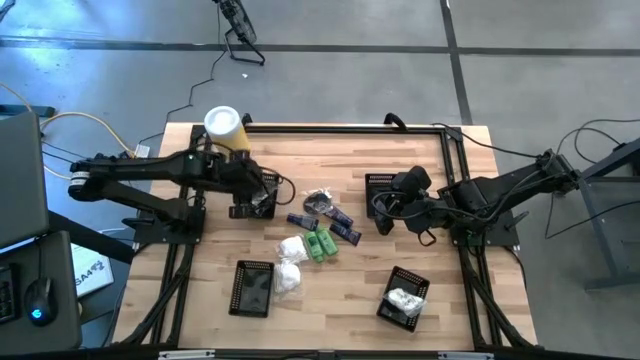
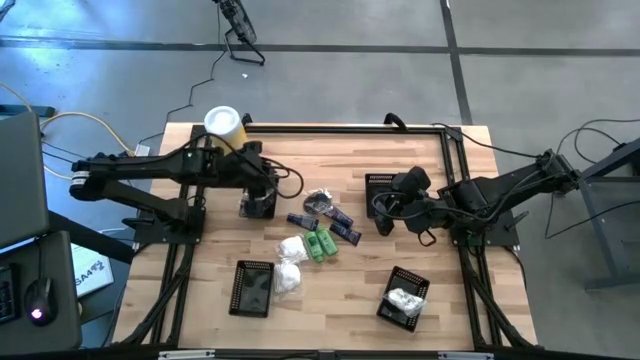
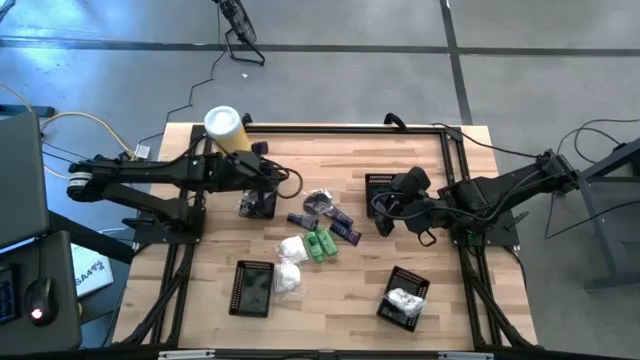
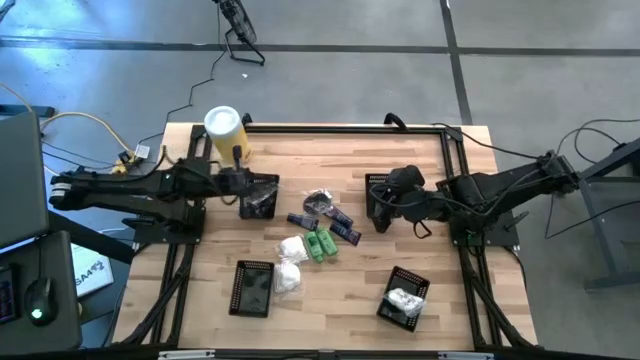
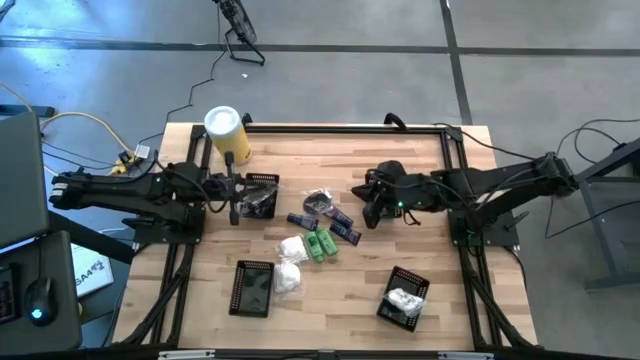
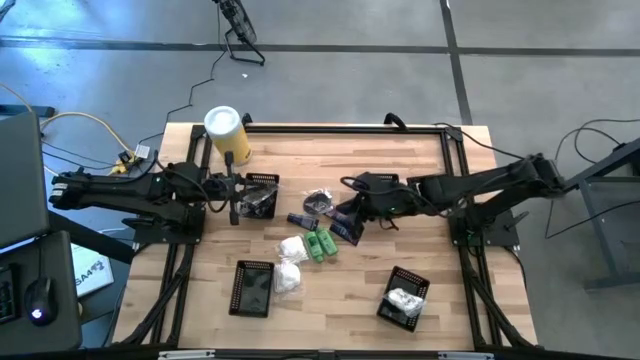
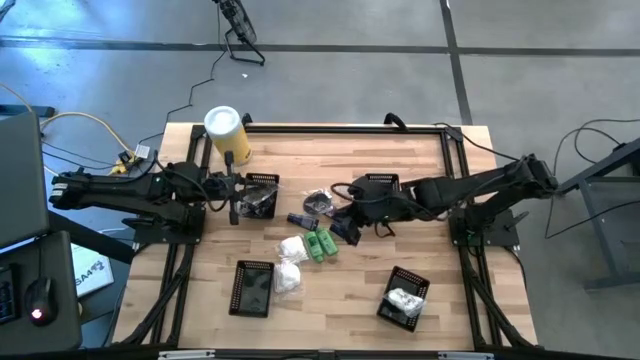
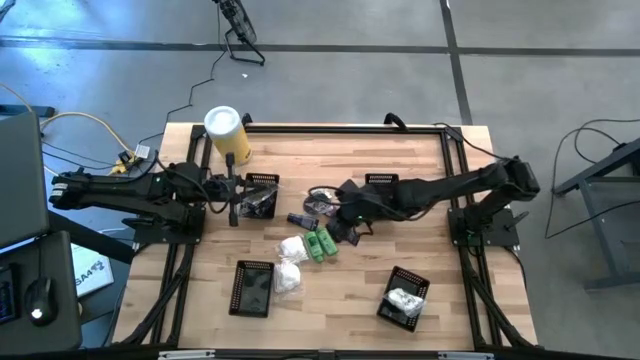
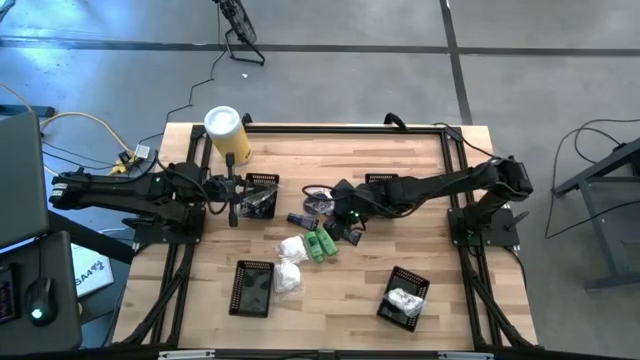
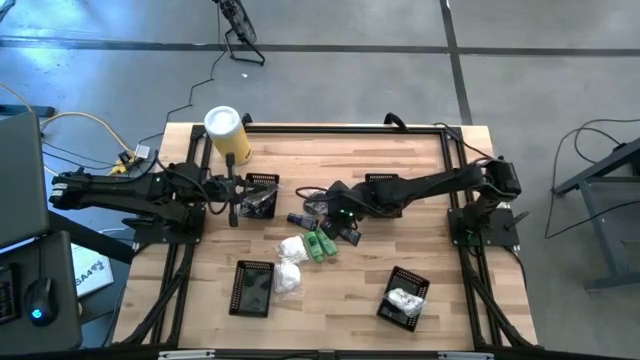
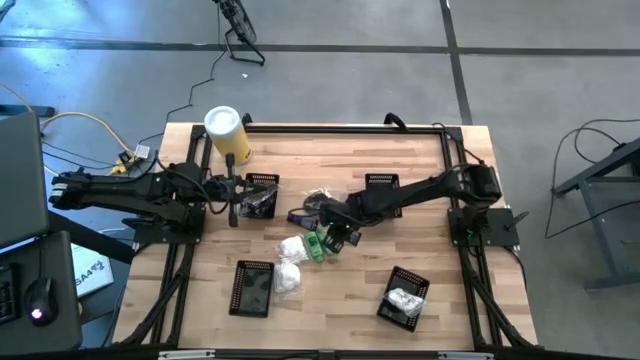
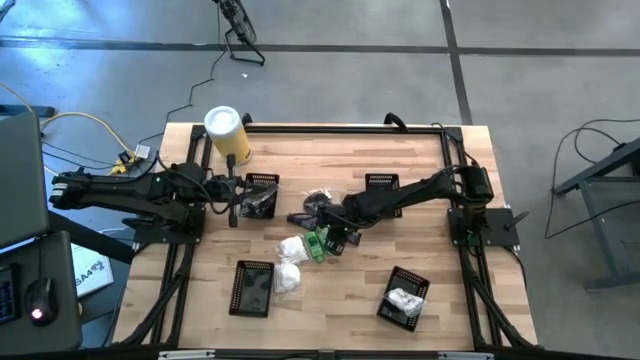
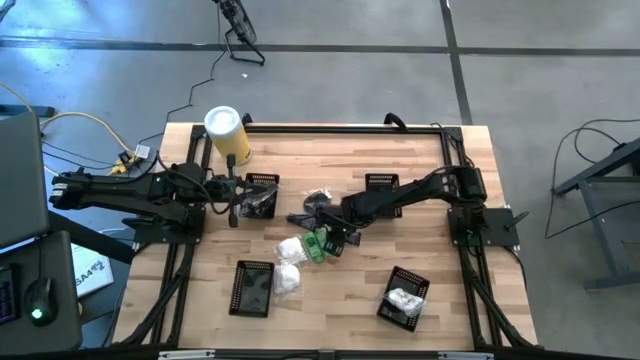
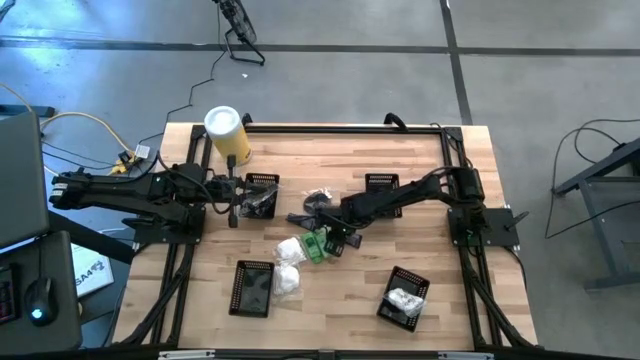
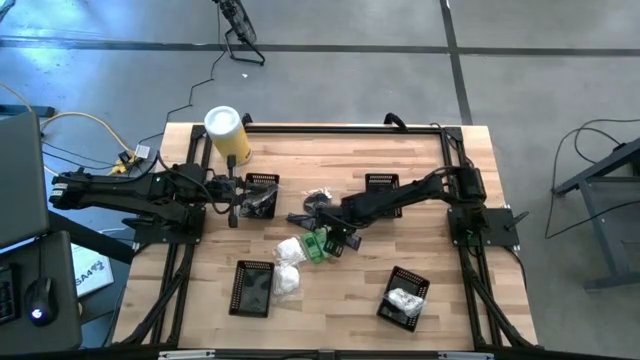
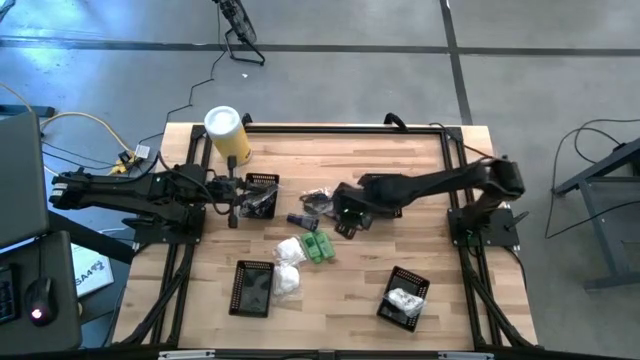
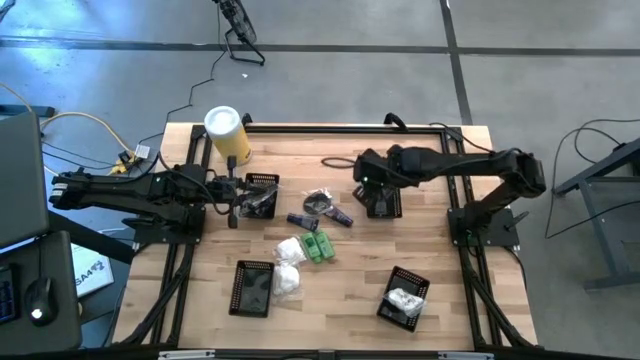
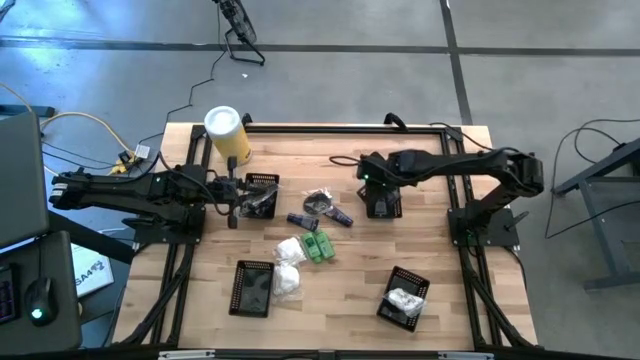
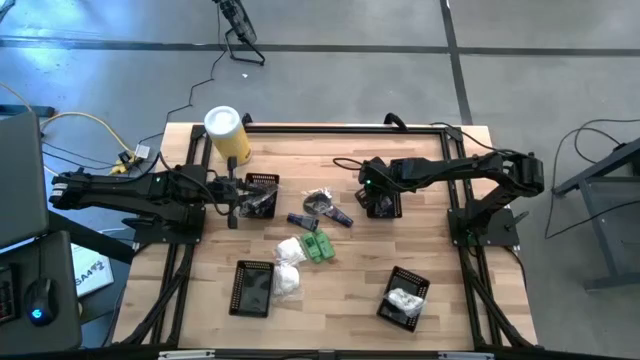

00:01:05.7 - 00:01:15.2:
Task: Pick & Place Travel size toiletries
Put the blue shave cream into the top right black basket

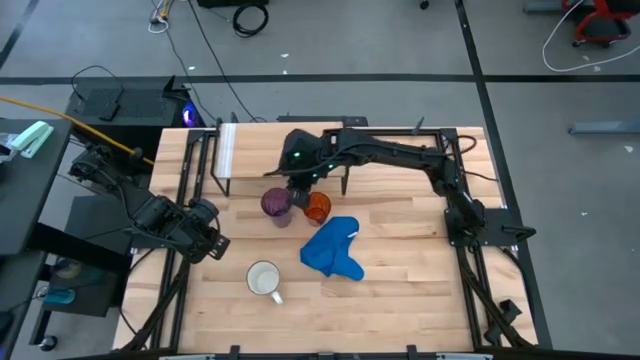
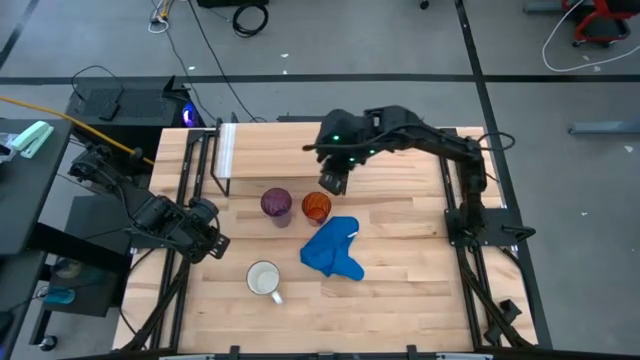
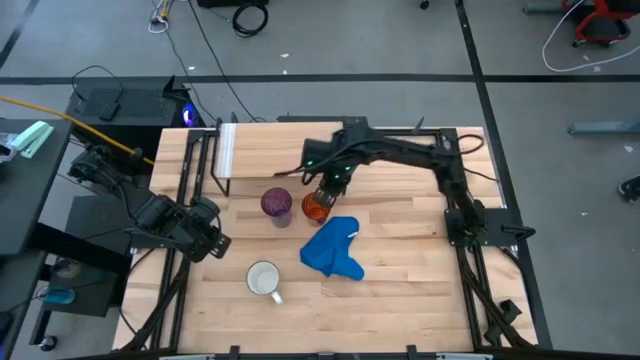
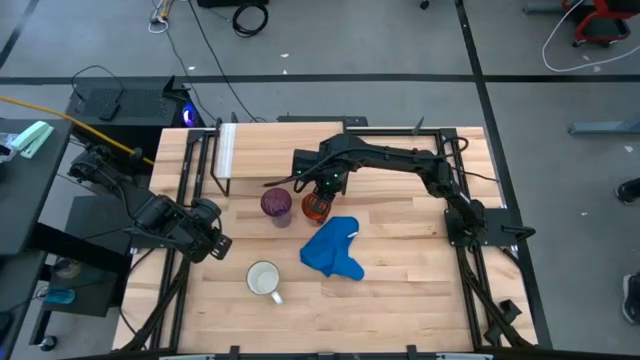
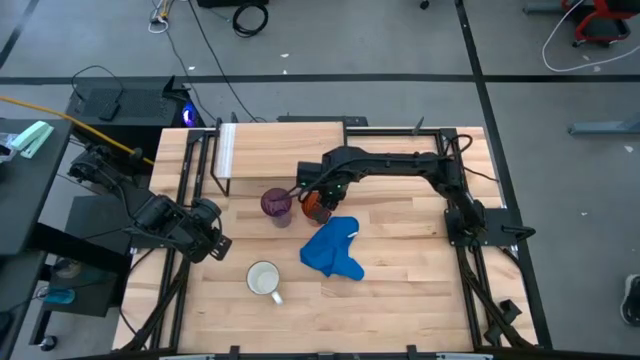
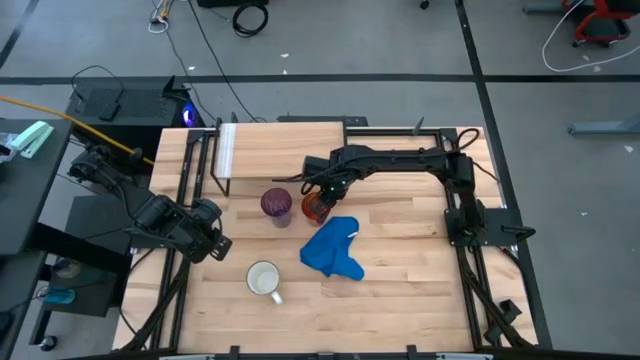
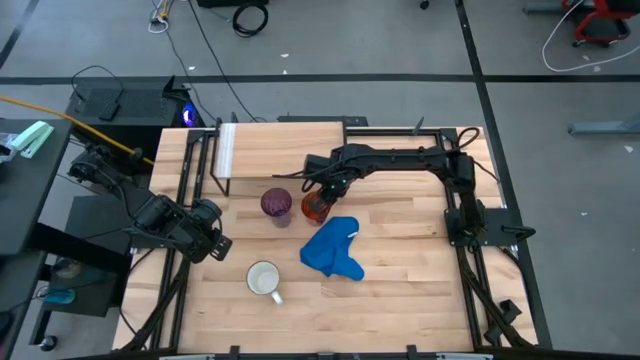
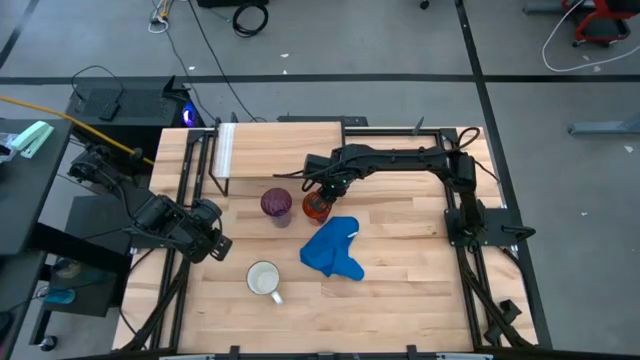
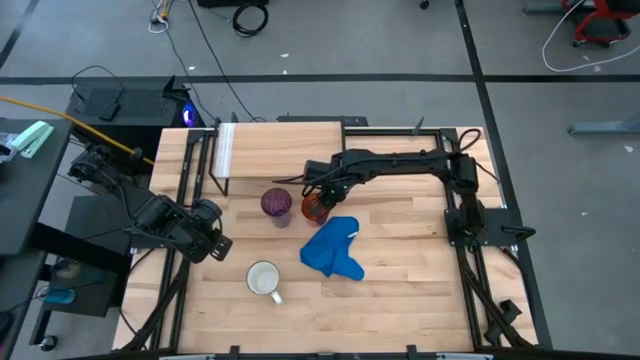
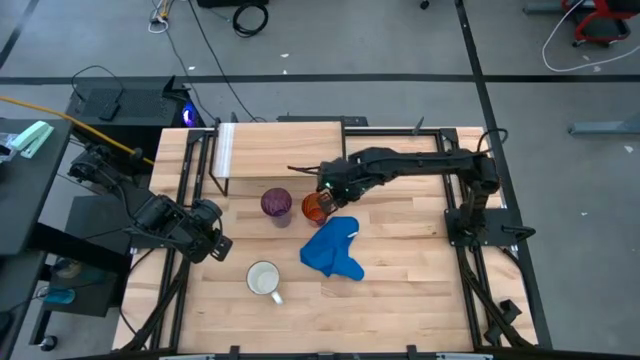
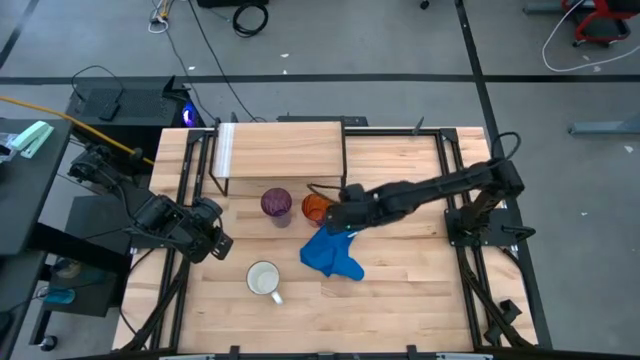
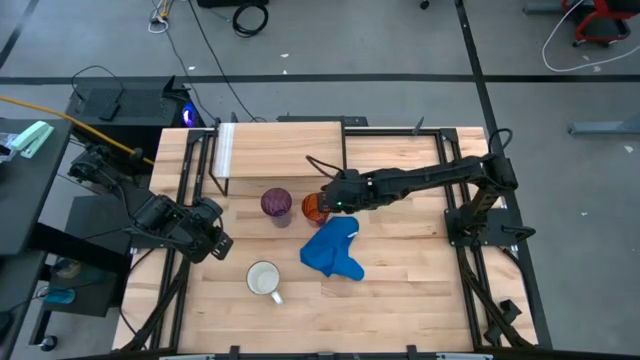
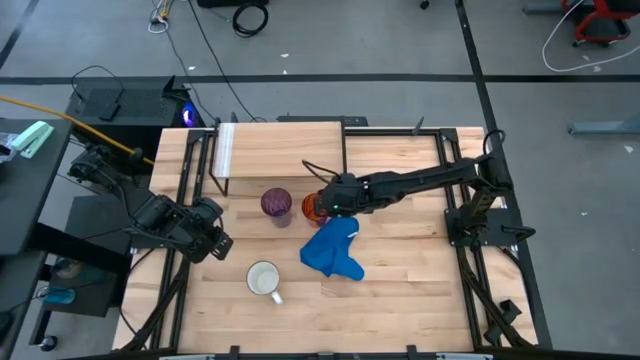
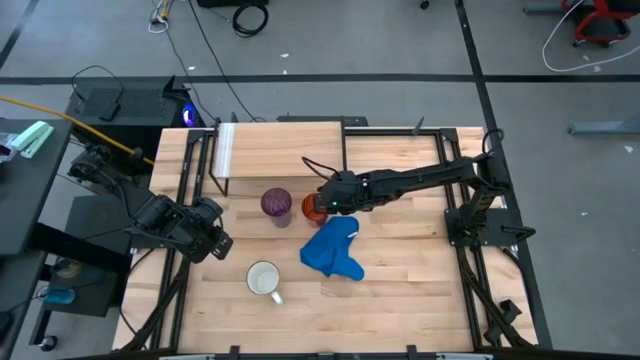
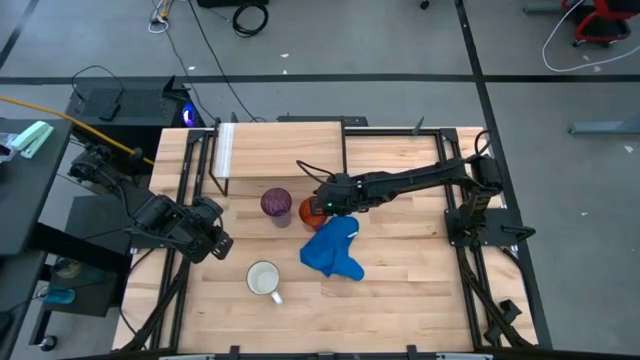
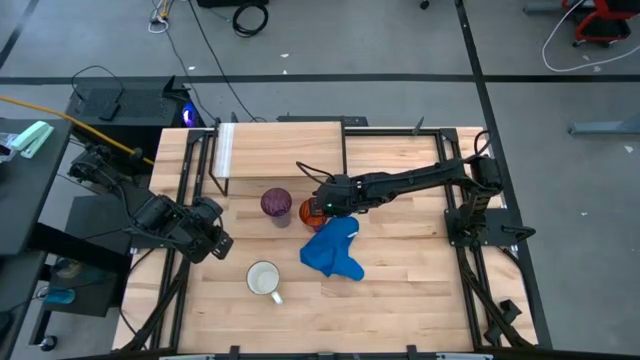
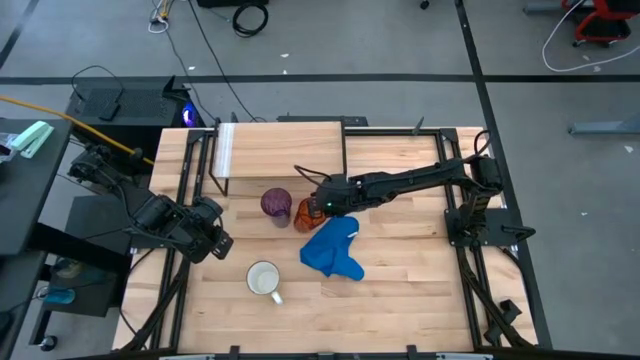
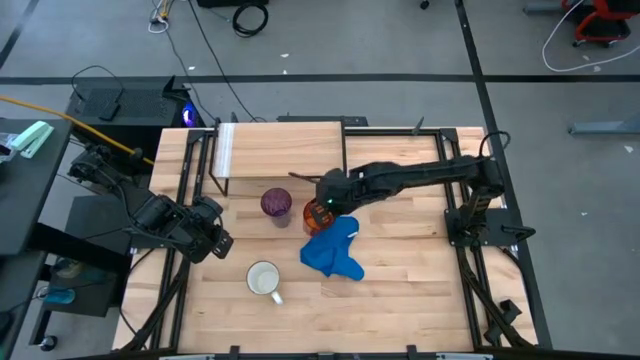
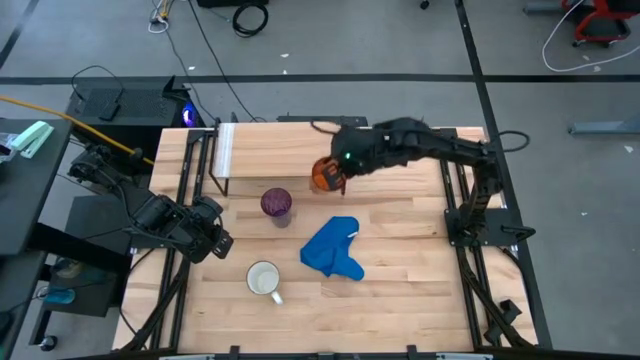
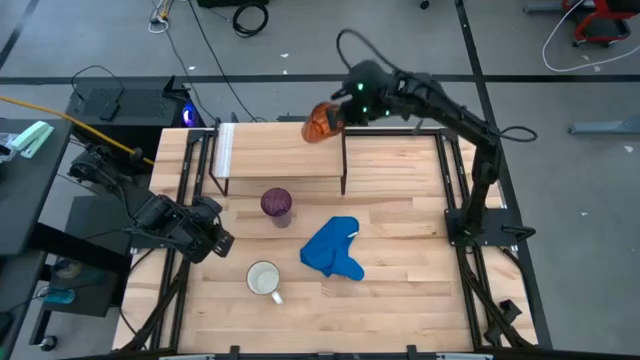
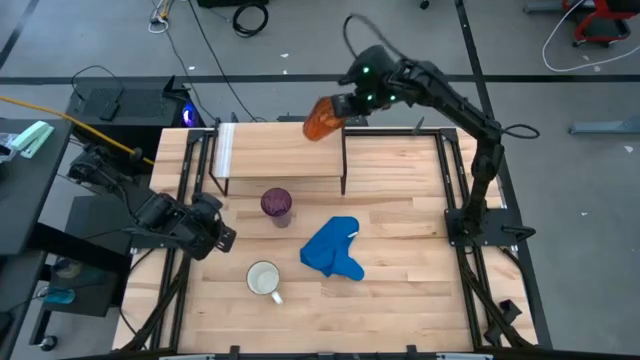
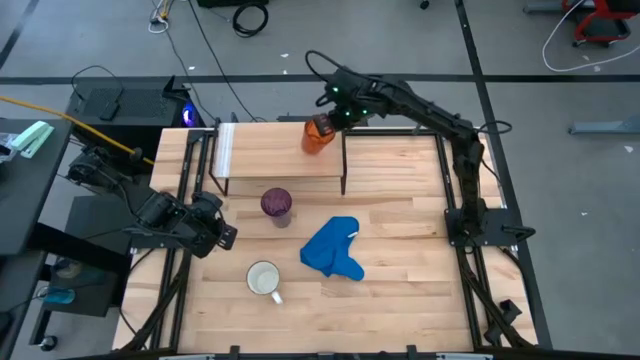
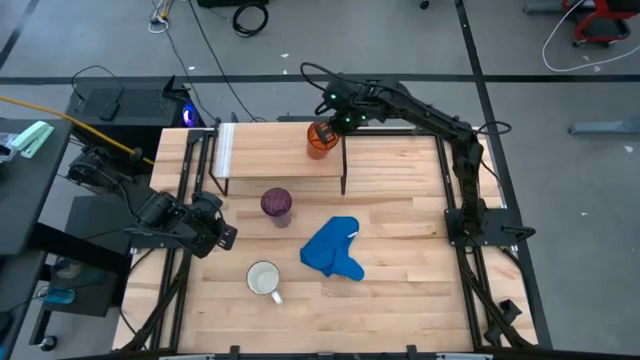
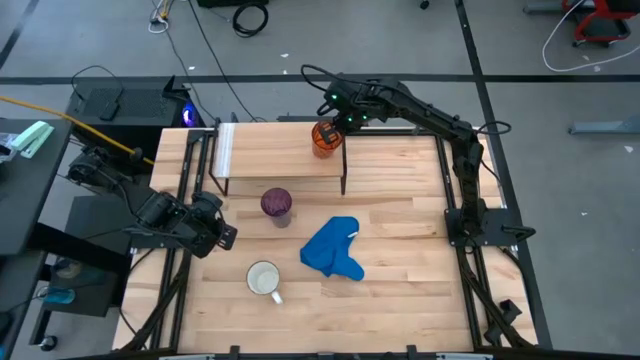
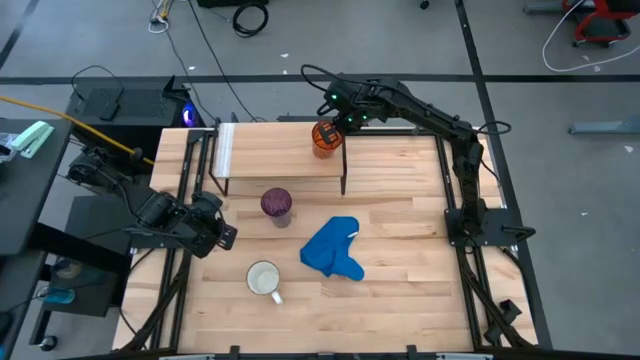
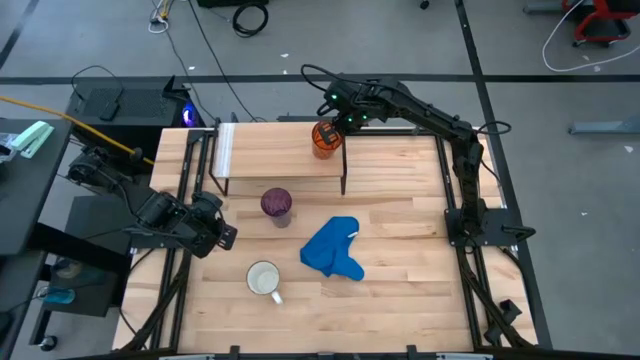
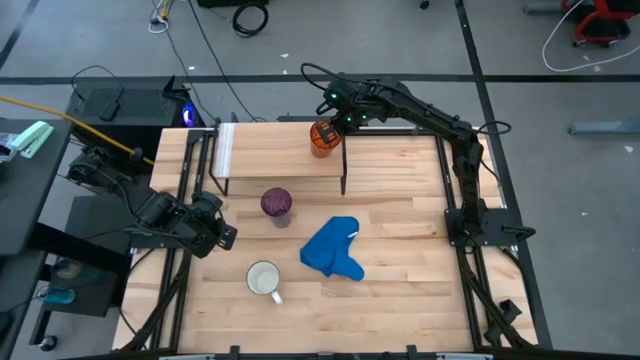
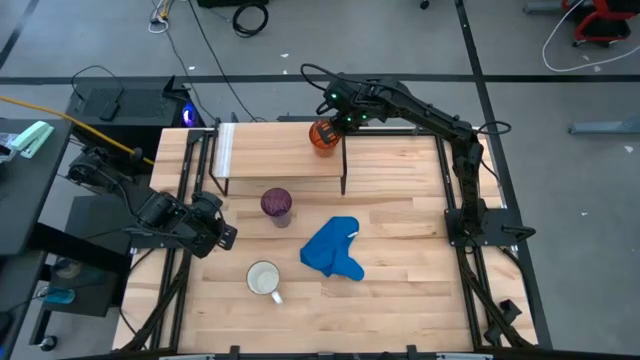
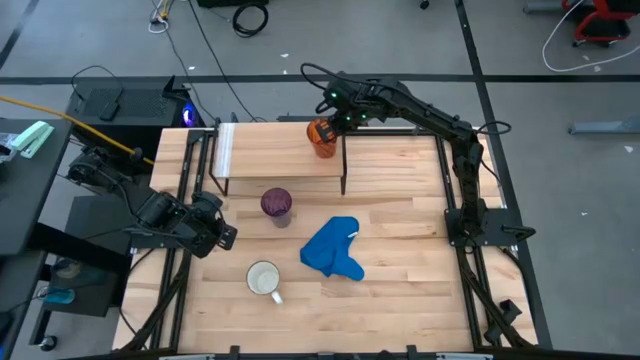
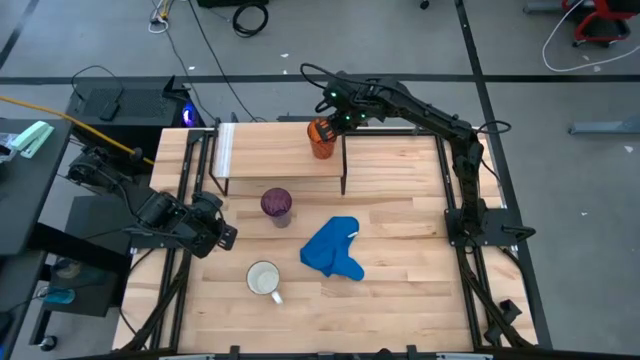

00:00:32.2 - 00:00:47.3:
Task: Stack small to large cups/mugs on shelf
Put the orange glass on the shelf
